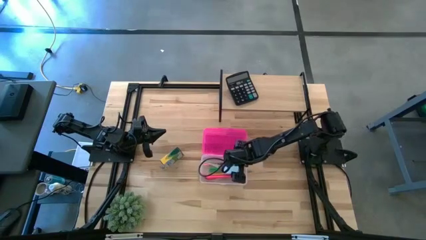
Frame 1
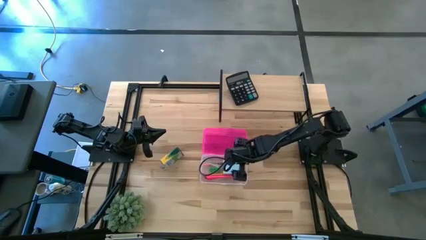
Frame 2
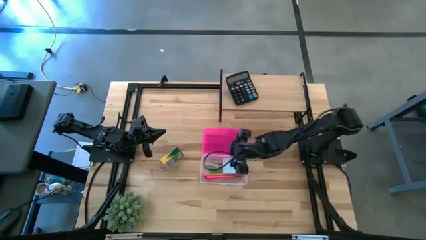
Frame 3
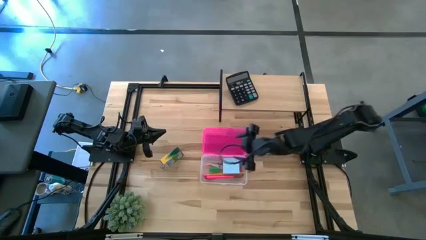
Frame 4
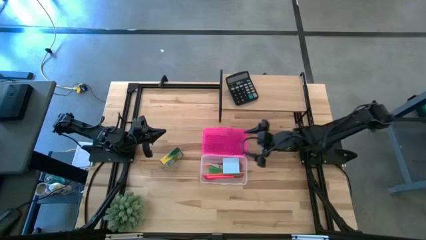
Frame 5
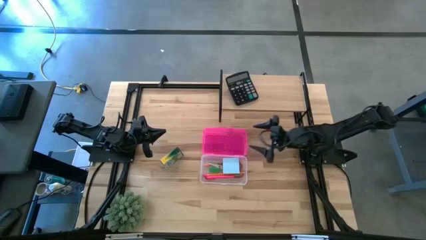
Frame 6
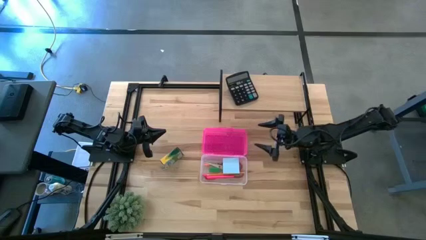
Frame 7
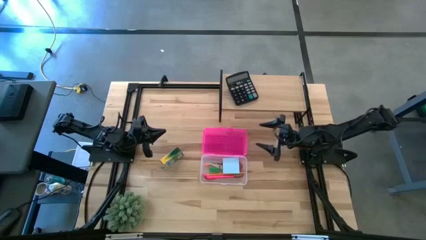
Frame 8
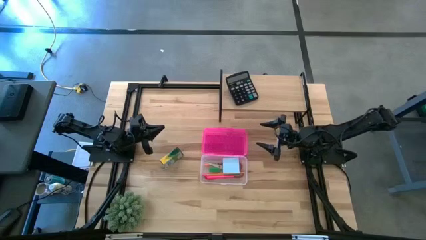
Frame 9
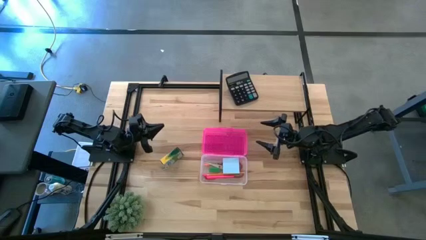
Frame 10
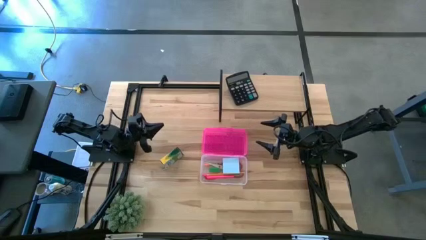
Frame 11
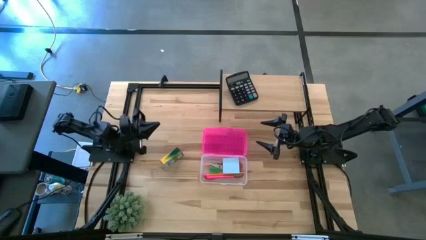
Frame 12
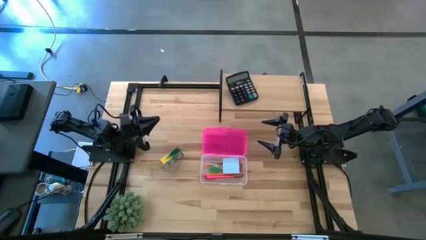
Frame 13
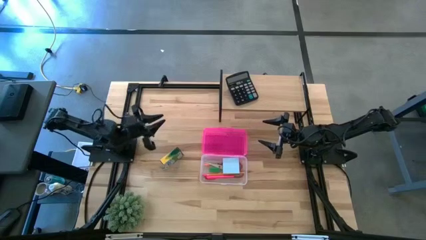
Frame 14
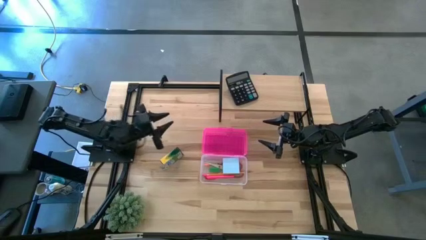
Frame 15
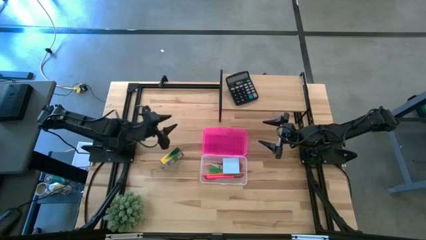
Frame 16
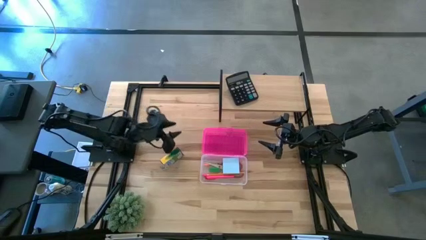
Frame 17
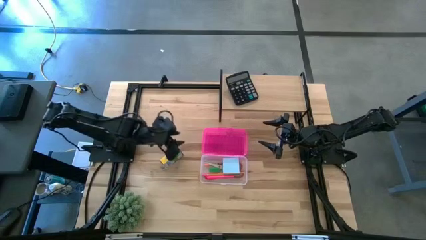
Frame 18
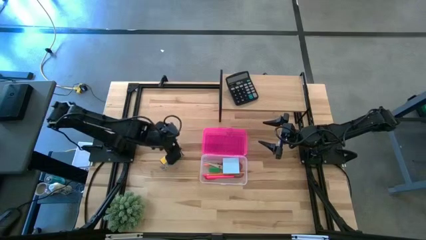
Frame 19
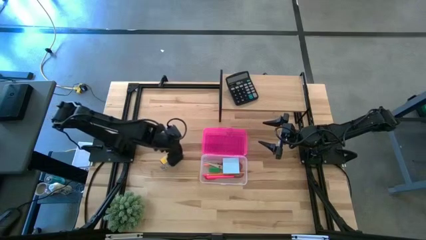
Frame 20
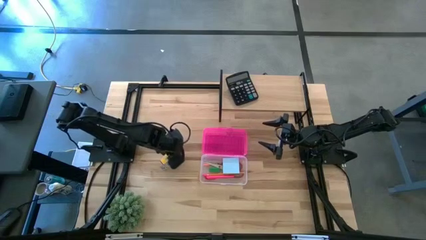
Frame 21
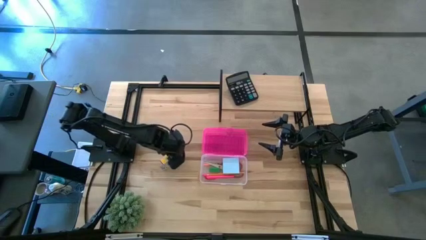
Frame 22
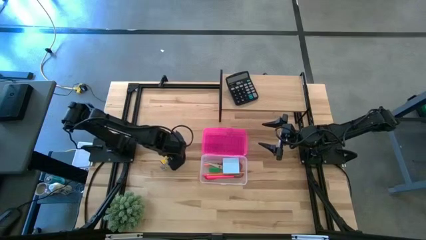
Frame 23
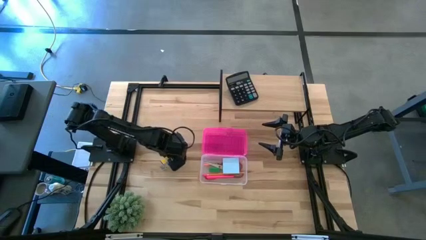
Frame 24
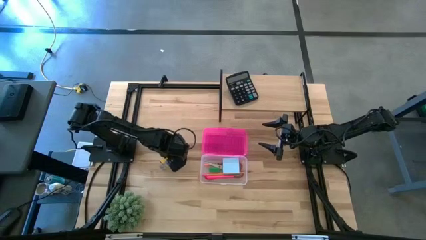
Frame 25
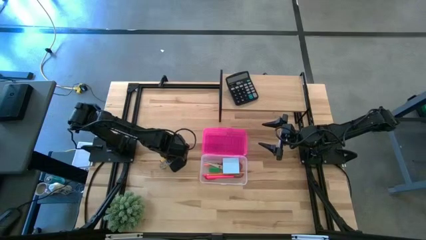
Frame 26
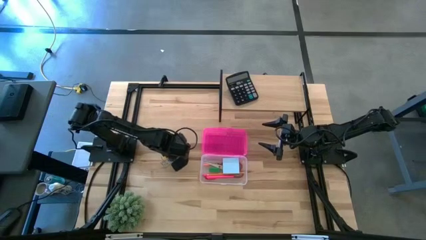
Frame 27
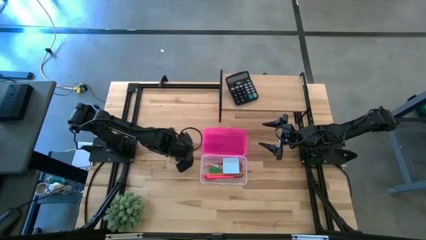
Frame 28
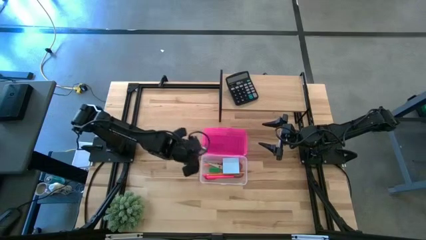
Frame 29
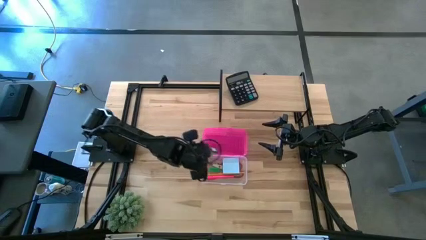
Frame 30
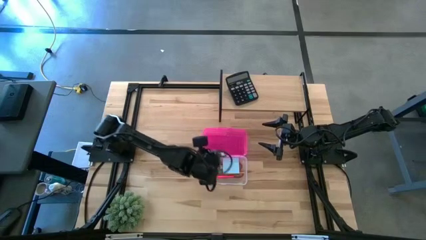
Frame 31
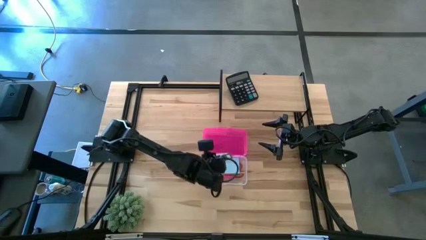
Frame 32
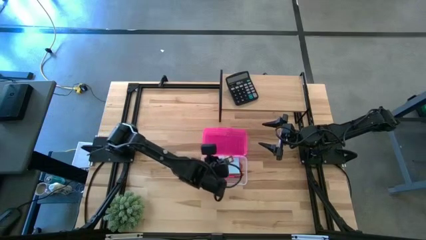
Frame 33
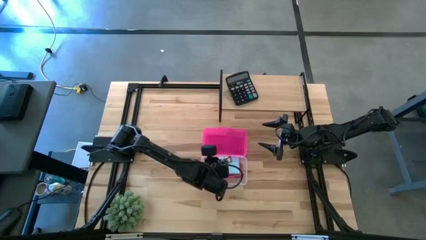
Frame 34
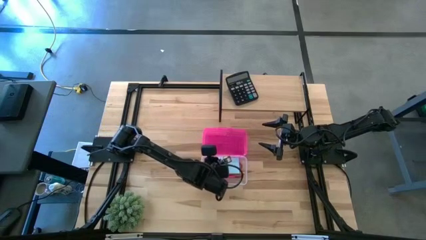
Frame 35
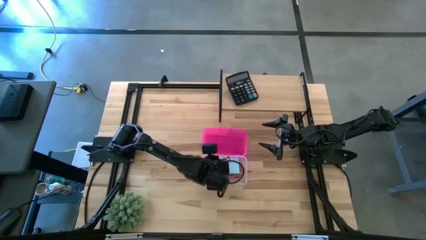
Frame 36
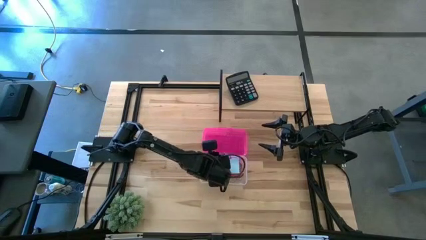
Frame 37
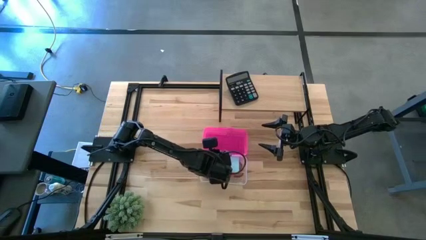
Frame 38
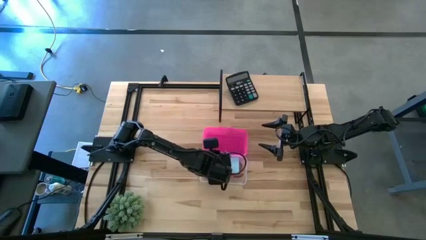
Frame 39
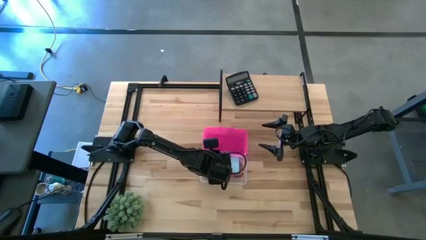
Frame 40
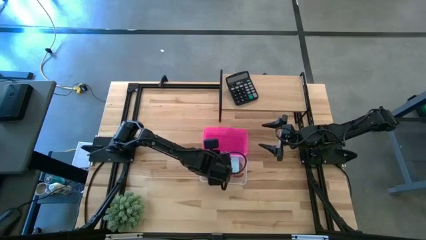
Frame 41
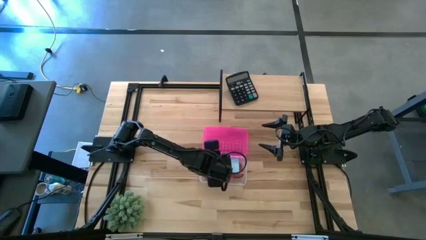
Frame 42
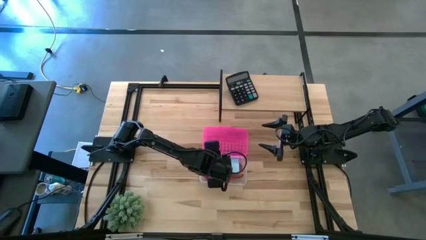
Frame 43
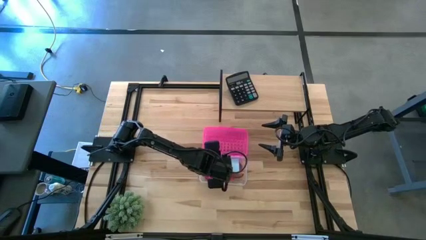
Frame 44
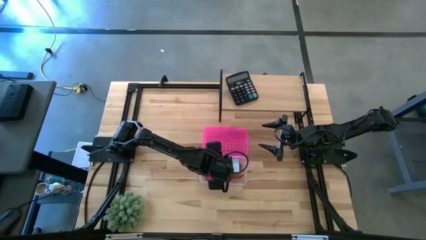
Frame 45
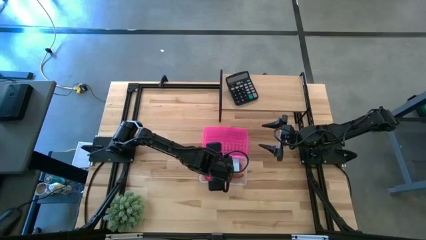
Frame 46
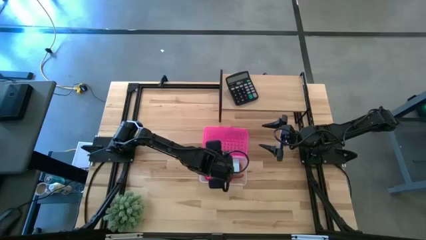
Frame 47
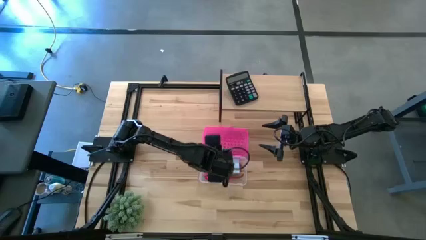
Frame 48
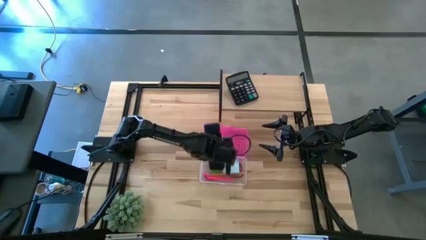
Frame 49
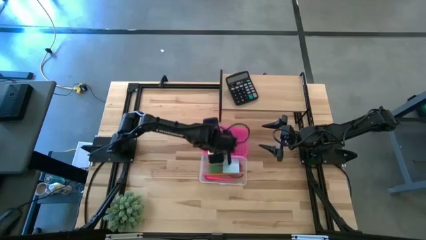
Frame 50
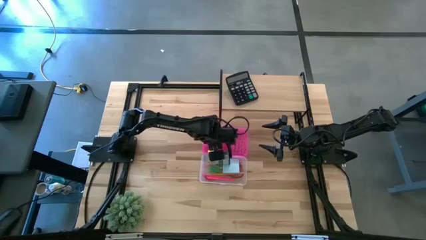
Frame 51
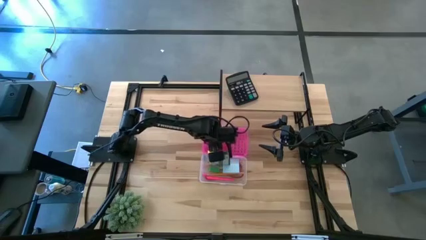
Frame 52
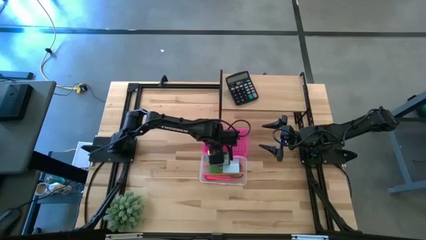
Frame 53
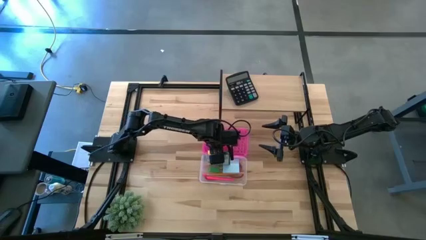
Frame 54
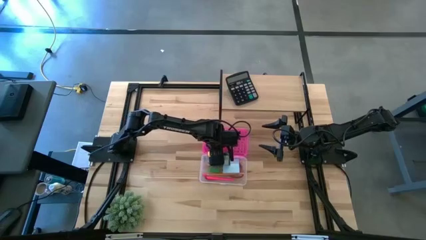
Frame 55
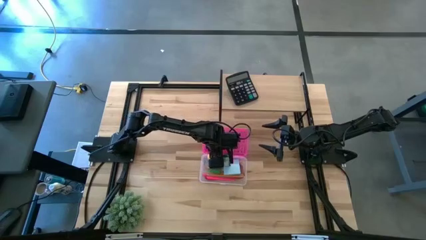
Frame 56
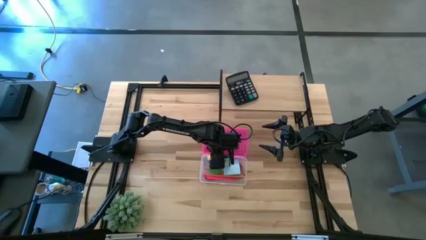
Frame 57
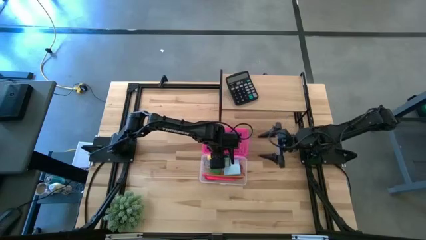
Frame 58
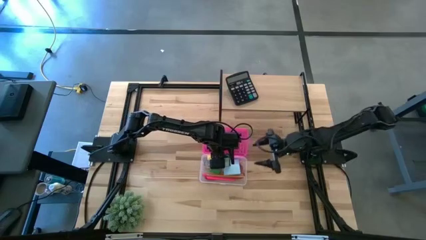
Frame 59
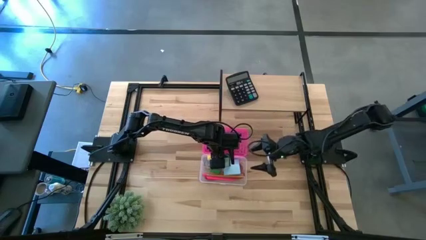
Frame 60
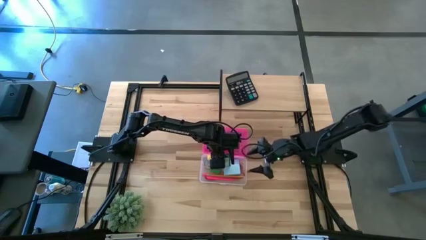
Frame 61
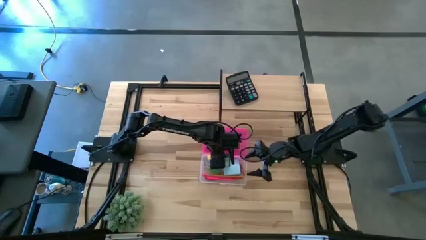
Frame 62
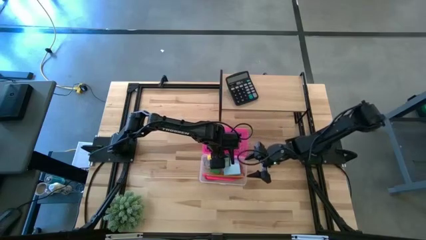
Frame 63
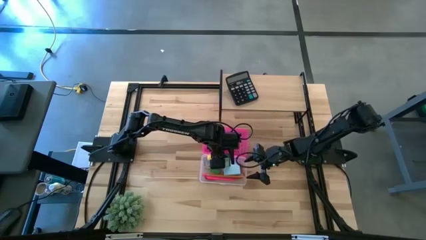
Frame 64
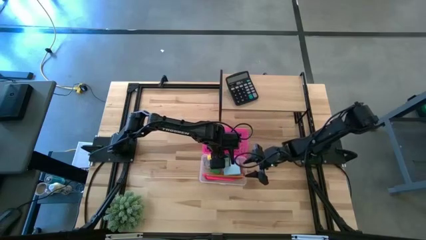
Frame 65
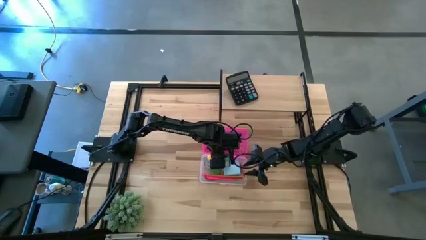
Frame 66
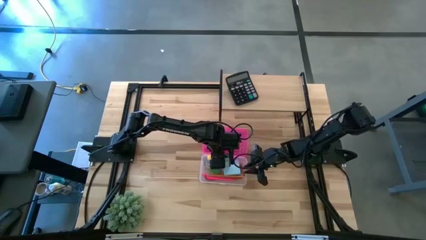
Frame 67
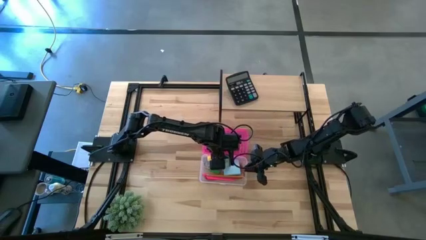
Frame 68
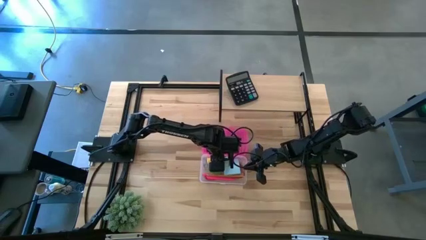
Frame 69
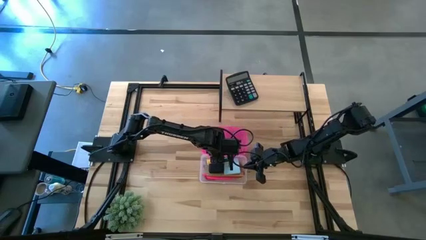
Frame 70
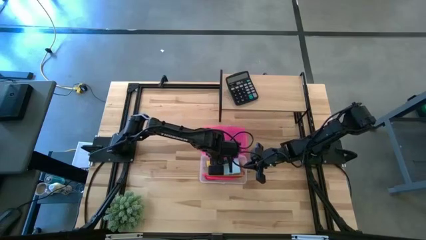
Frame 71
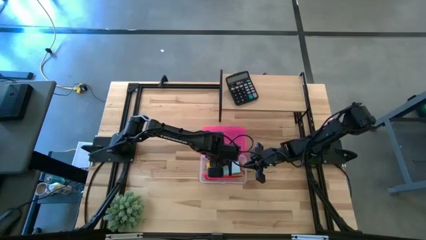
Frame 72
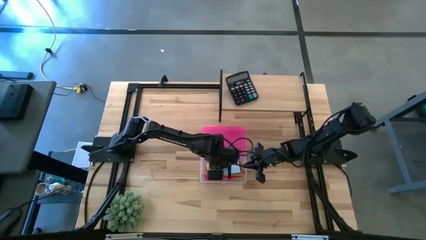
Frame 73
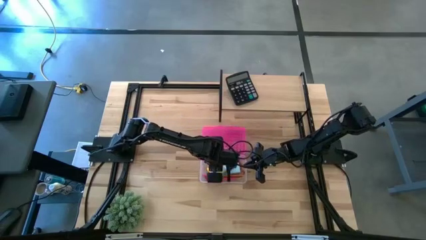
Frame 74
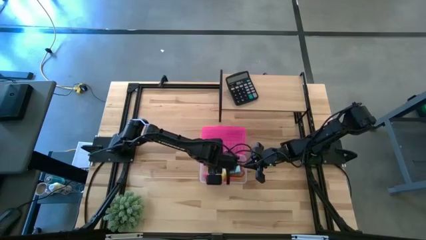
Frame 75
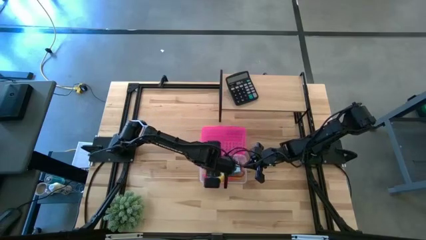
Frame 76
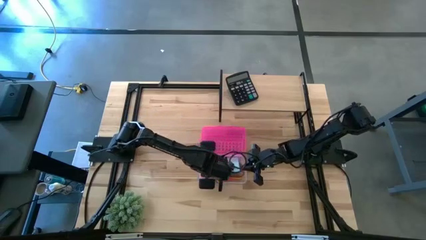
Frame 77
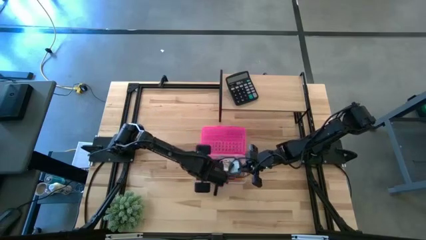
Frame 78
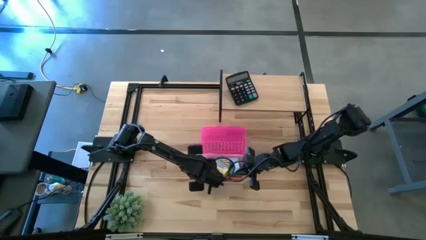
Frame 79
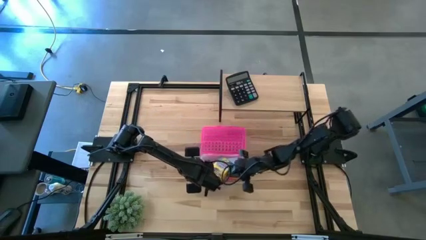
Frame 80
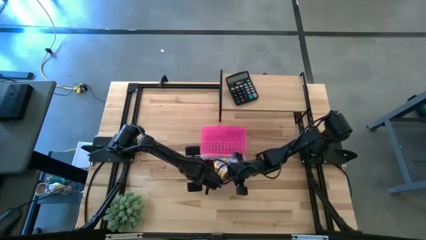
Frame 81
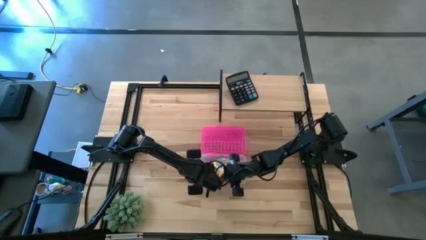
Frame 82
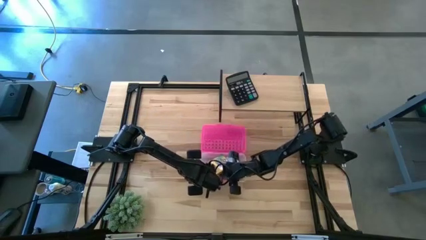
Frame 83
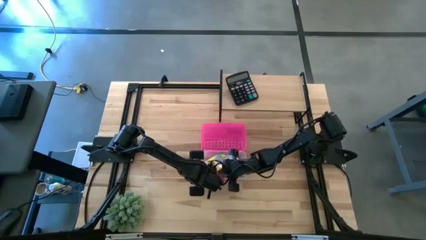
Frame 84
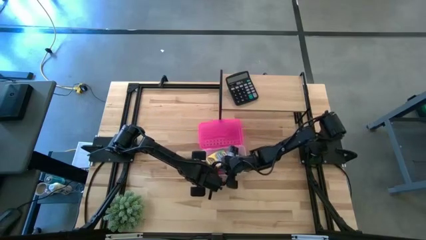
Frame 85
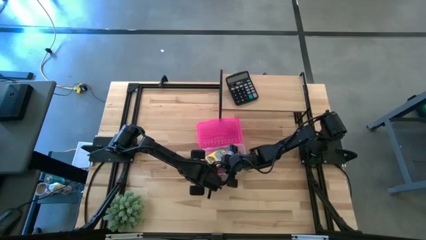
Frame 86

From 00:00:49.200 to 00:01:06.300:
Task: Pack school essentials
Put the box of crayons into the supply box
